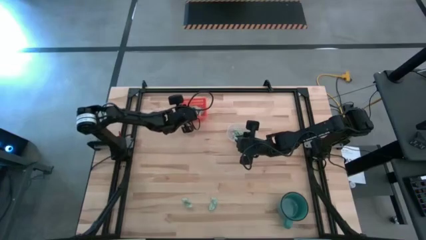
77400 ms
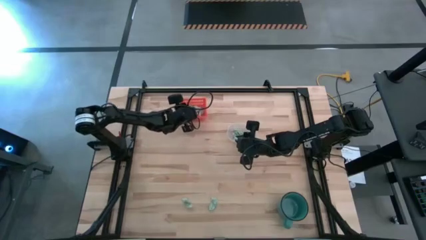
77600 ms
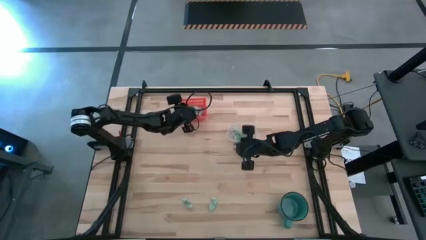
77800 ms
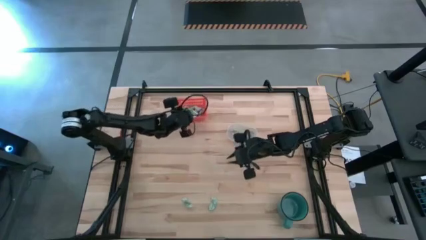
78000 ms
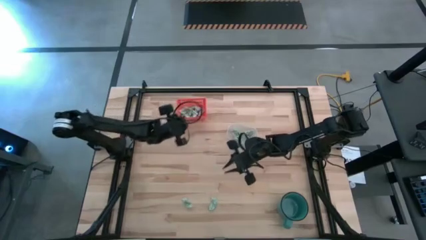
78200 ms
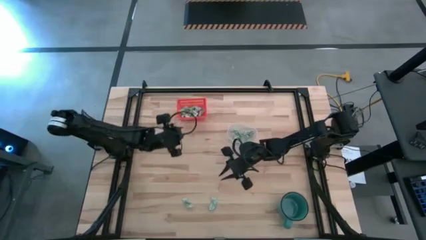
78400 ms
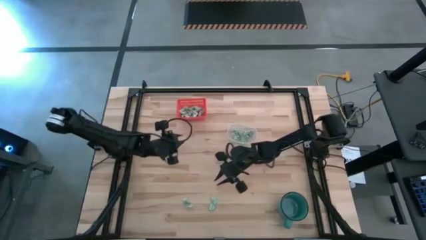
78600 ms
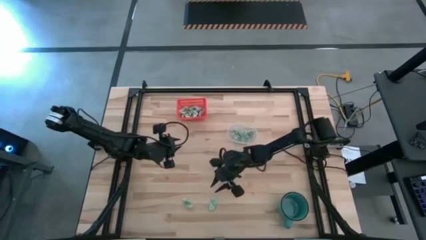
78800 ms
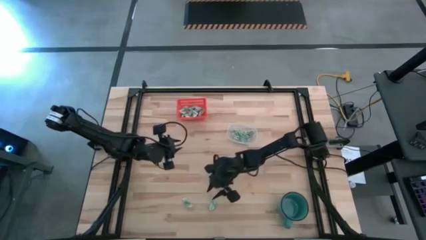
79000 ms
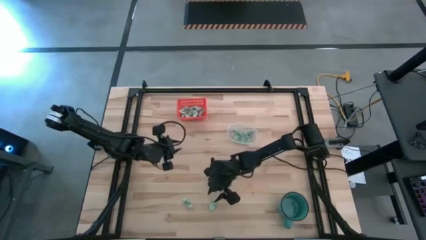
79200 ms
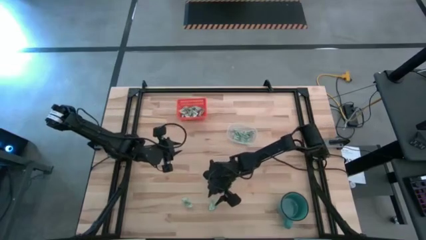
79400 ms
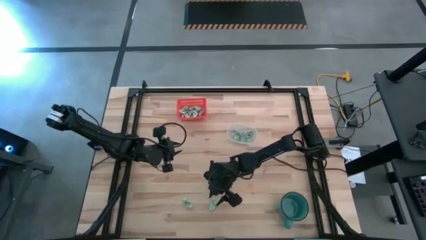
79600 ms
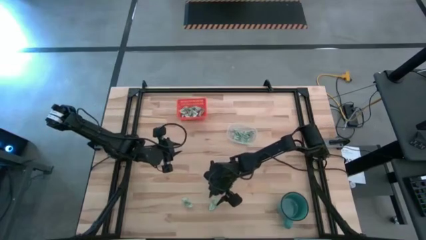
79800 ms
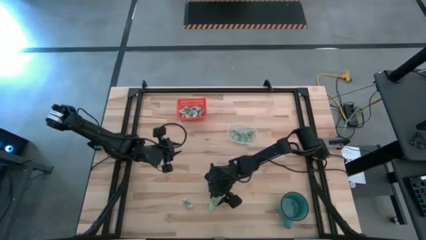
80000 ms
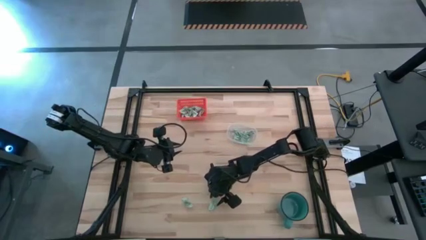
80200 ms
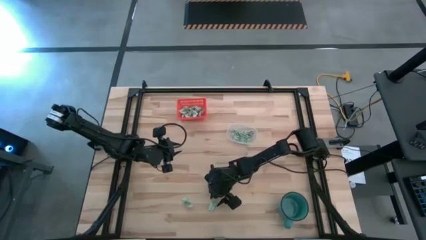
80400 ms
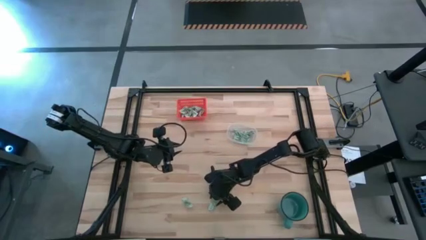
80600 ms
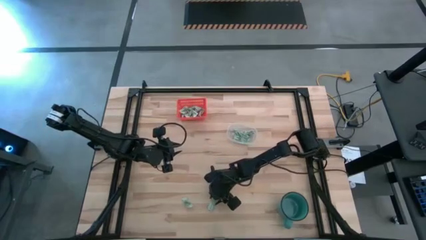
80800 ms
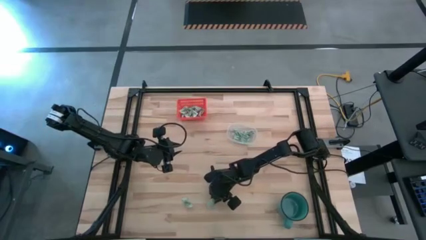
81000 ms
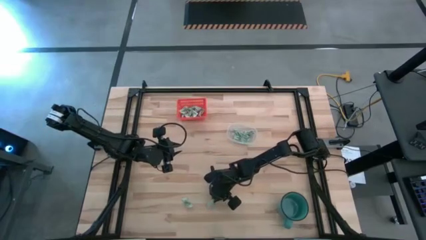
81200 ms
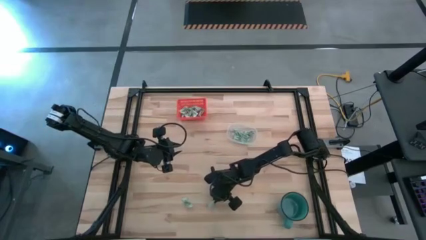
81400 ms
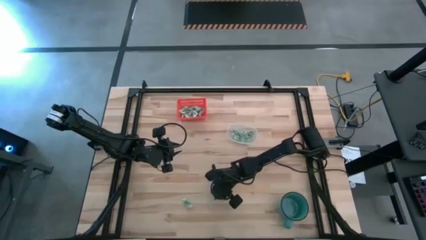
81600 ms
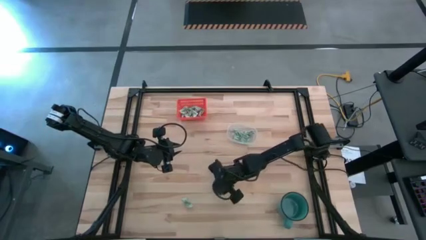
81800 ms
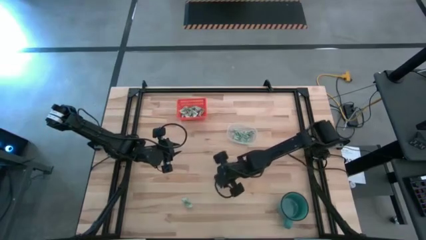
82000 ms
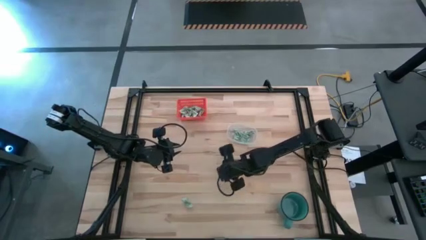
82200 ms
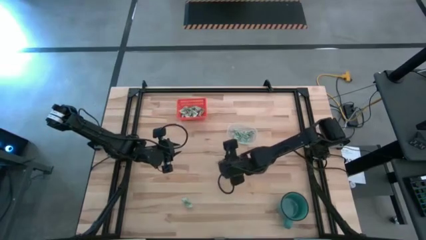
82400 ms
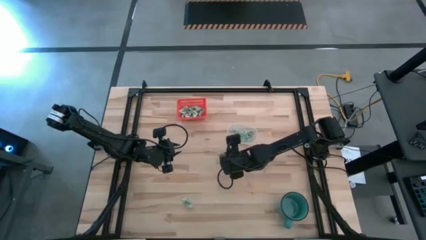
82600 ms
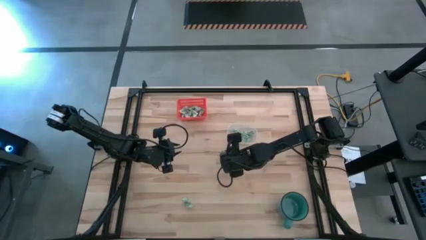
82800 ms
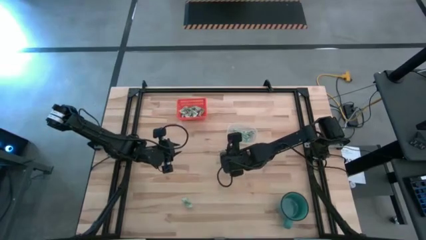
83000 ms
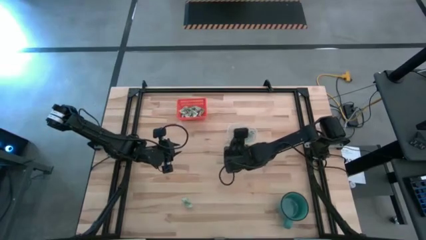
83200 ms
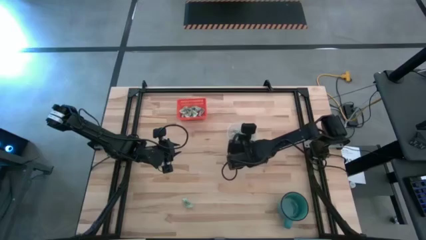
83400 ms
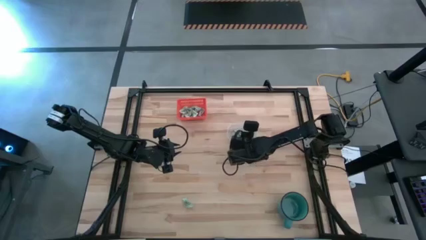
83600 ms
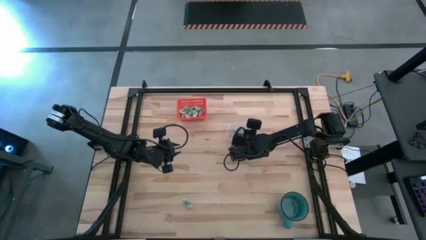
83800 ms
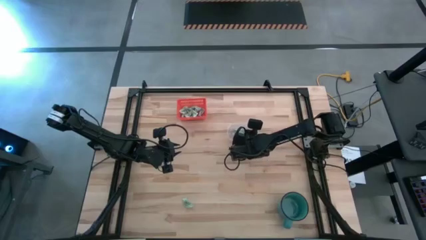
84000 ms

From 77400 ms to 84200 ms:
Task: Pick and place items into bin
Put the green stevia packet into the transparent bin

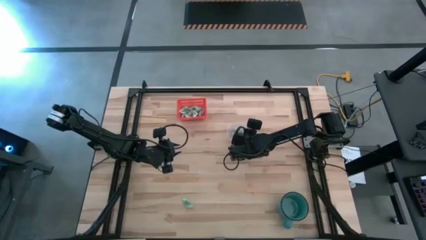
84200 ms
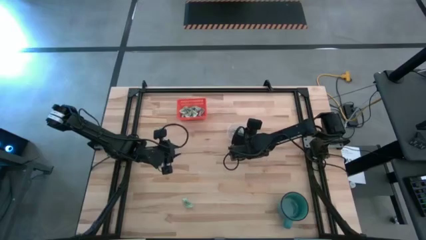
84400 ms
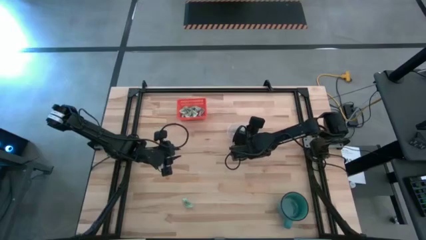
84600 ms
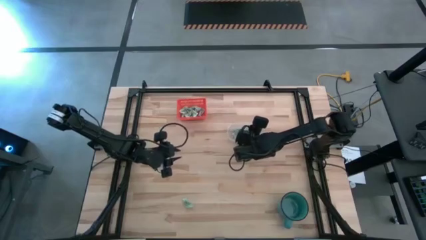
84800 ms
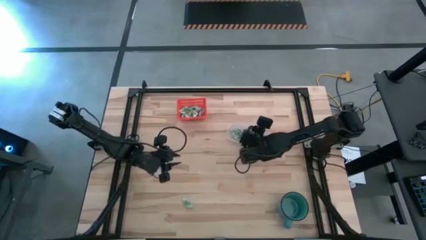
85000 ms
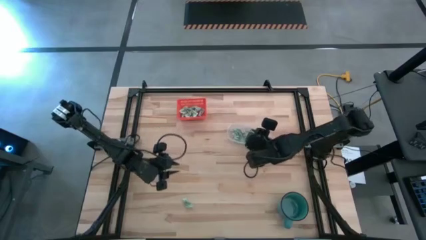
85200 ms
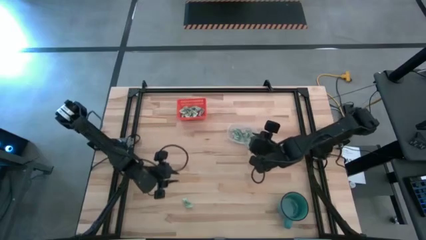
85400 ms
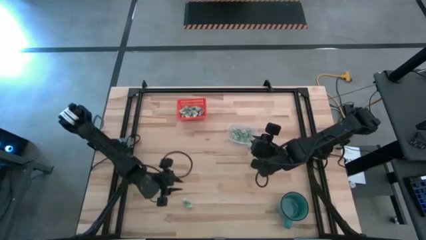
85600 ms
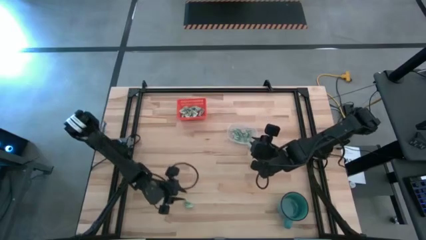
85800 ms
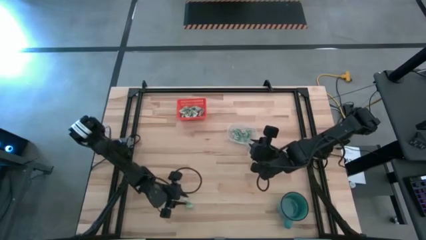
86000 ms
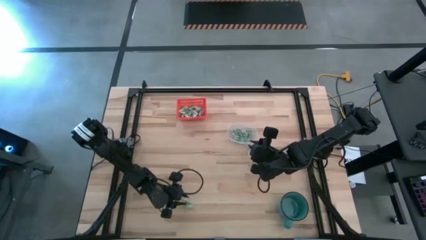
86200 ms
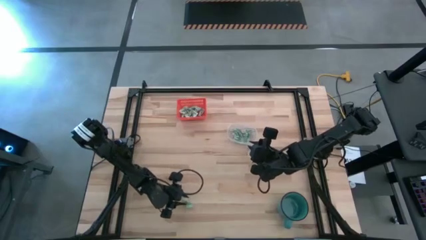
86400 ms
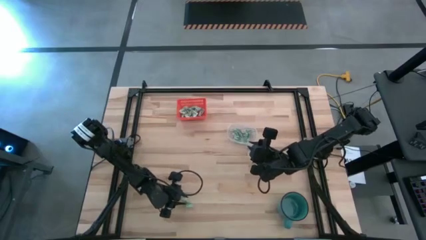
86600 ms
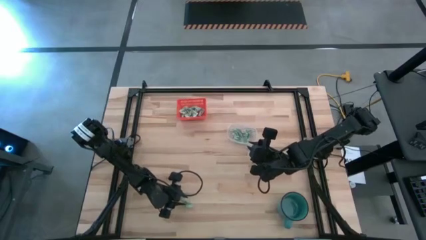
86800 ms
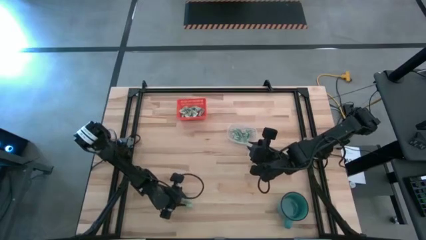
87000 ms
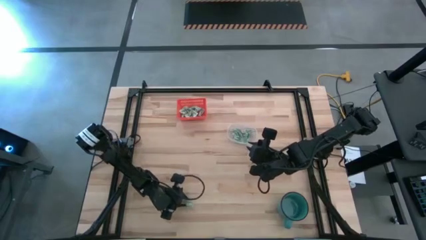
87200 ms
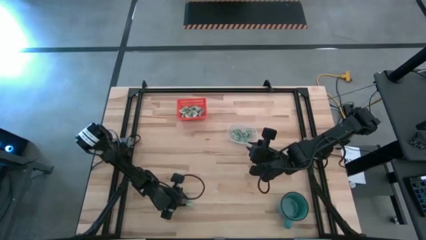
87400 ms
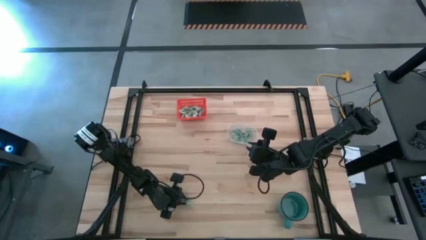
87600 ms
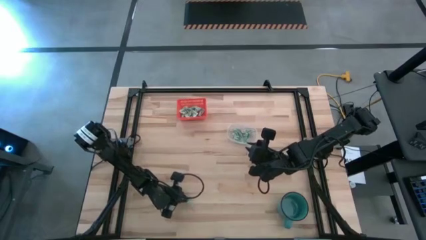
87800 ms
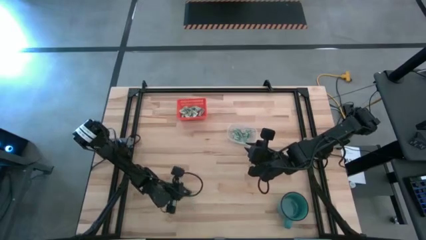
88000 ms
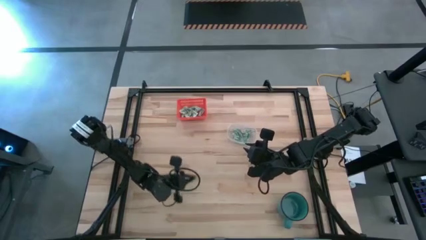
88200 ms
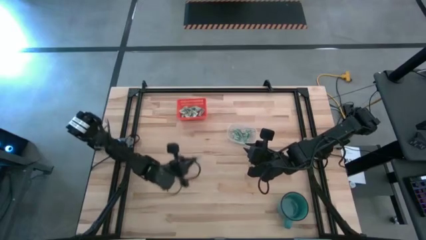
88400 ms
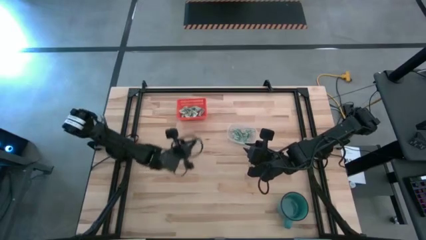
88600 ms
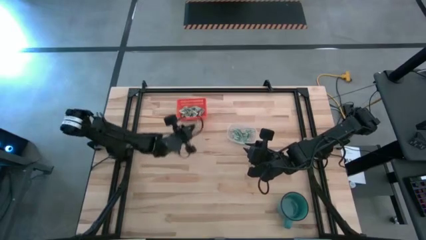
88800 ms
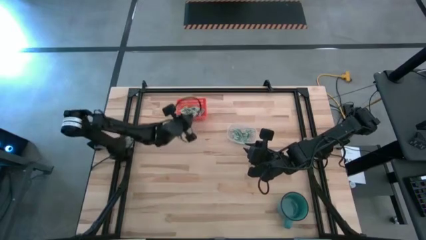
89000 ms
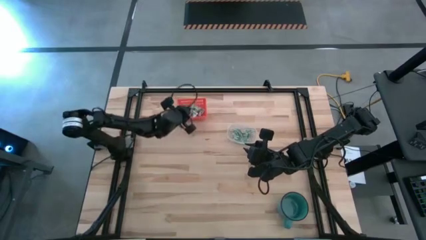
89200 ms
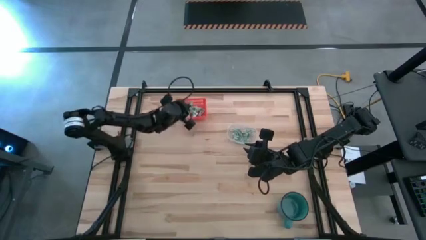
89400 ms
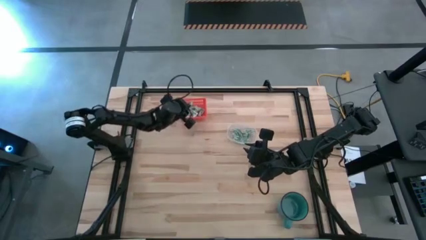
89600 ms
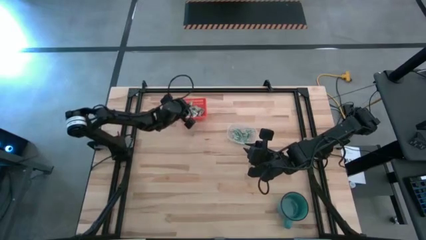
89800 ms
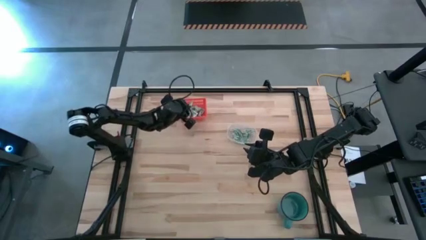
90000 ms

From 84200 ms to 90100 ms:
Put the green stevia packet into the orange bin

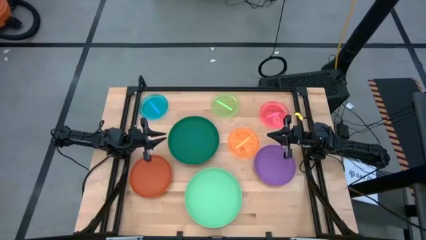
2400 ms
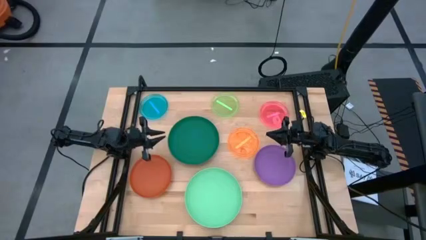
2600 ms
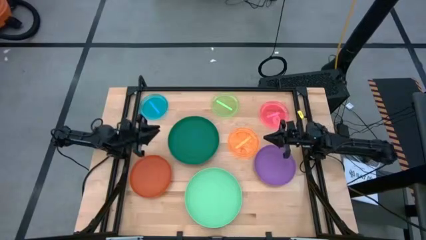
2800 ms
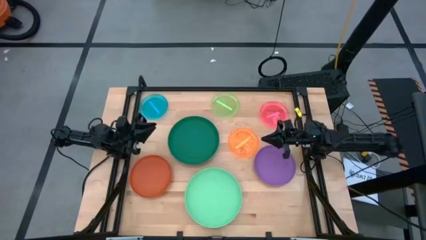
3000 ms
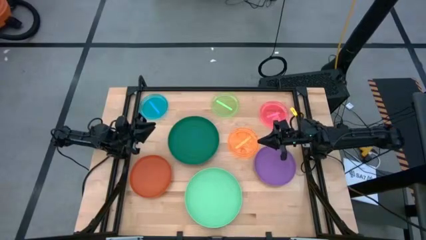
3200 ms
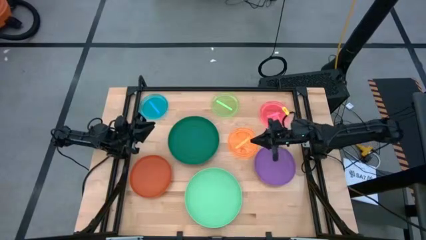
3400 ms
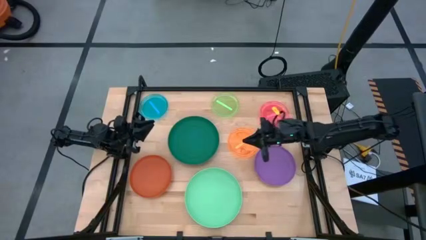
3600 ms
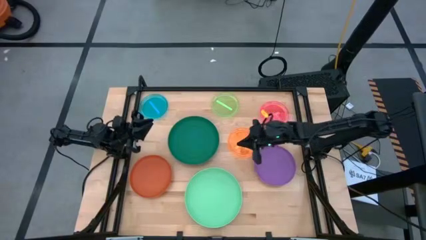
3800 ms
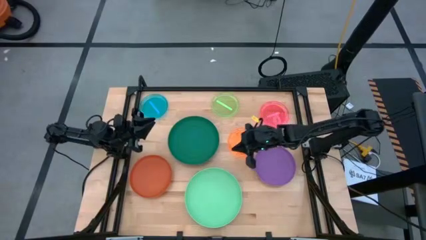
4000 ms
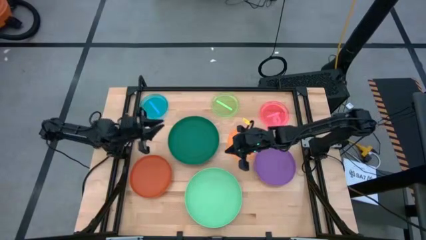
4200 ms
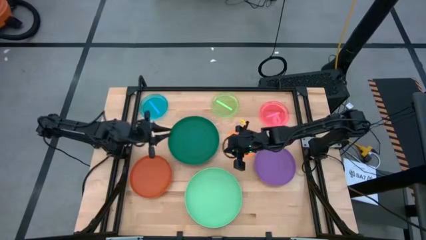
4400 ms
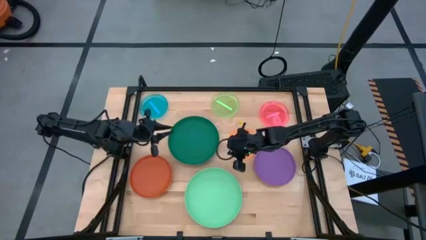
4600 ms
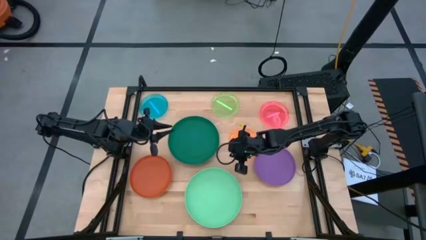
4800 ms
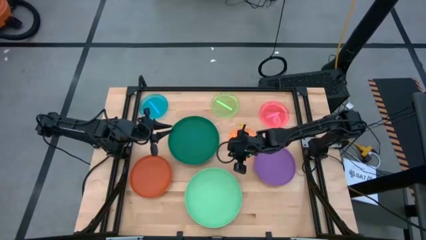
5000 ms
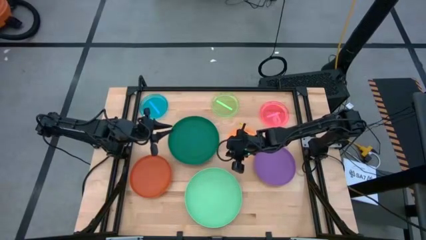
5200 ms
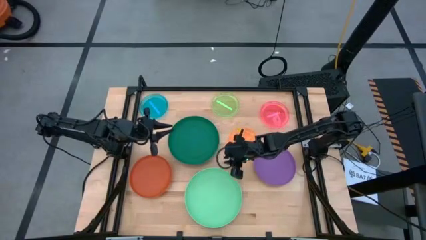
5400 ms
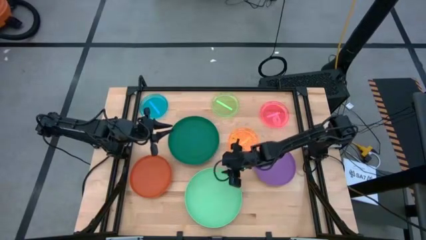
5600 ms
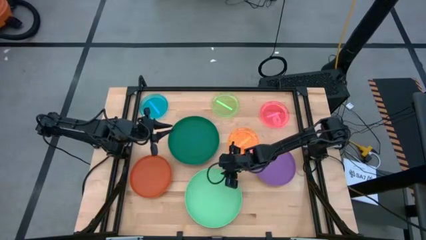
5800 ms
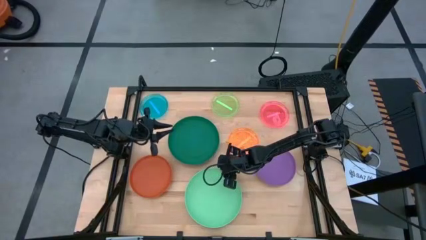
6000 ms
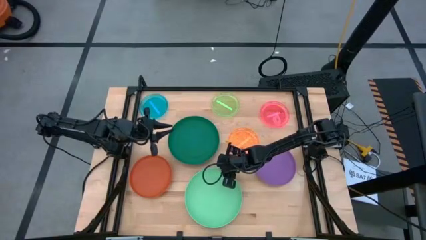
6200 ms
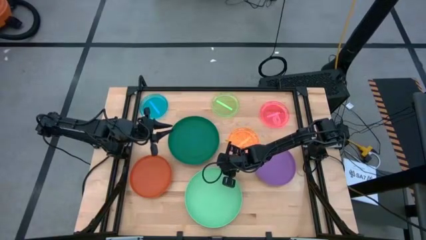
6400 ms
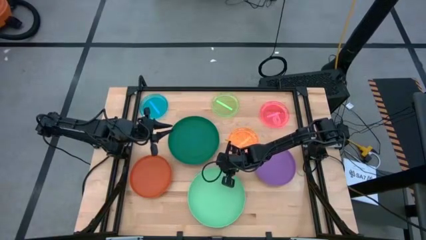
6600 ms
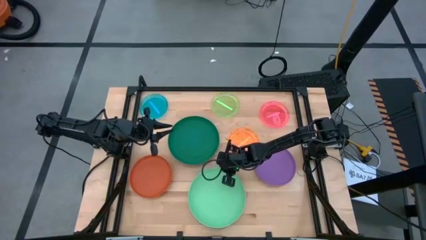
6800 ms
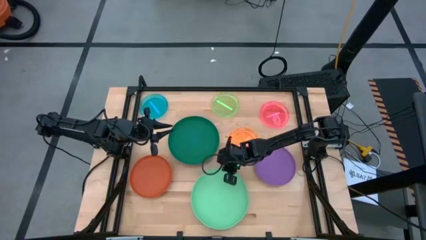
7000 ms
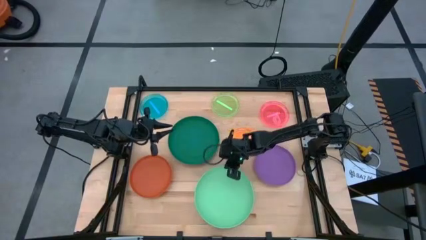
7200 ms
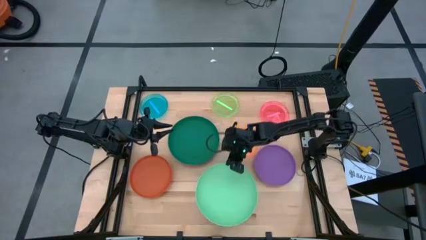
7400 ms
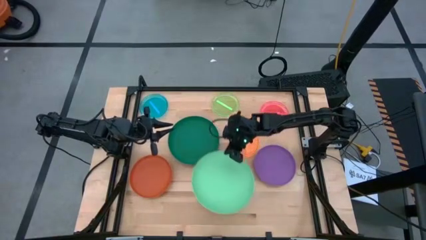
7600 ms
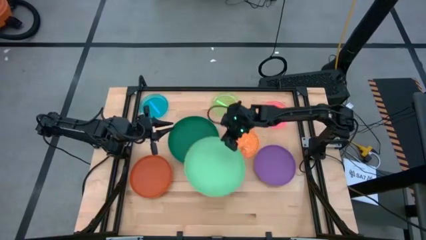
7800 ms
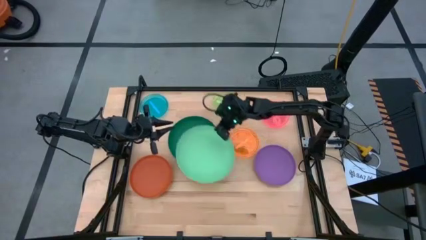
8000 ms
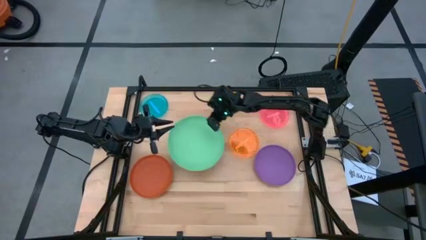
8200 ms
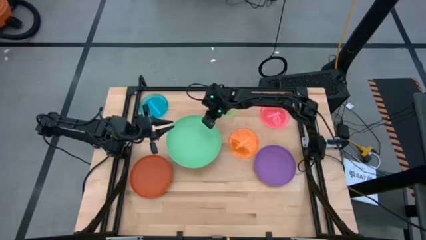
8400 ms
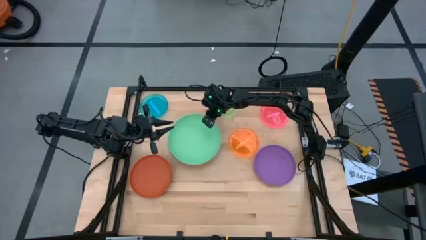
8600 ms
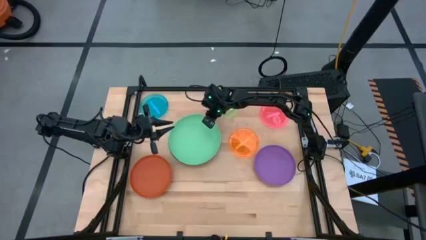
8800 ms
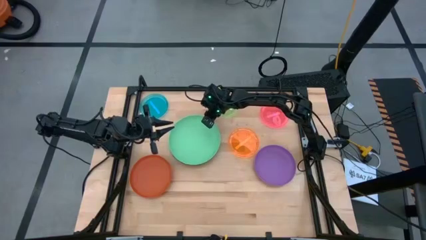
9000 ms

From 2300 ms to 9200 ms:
Task: Stack plastic plates
Stack the light green plate on top of the dark green plate
